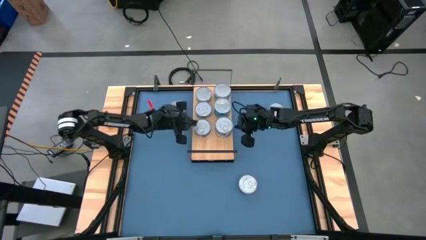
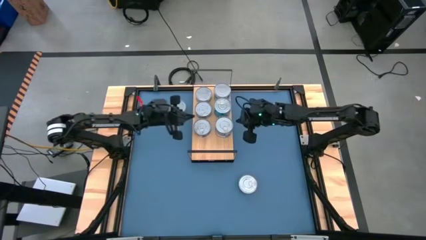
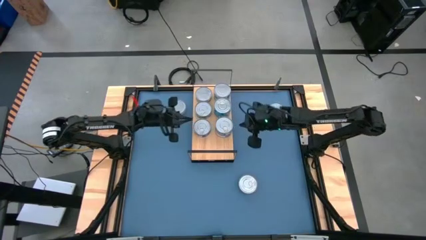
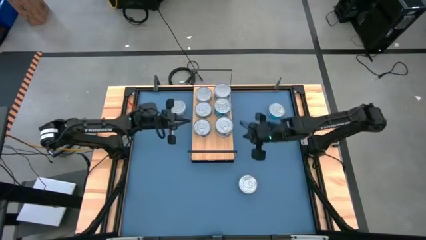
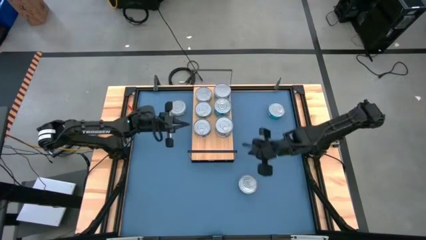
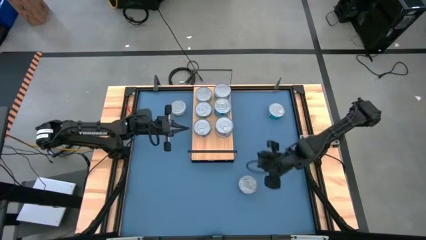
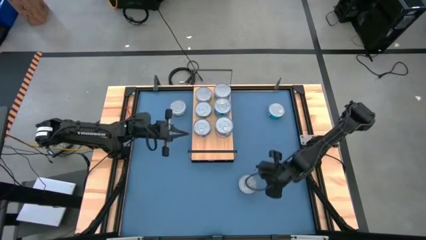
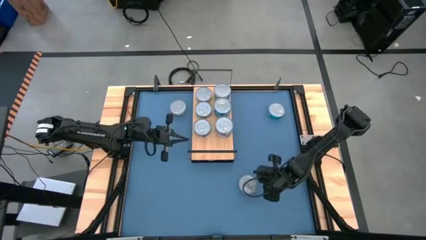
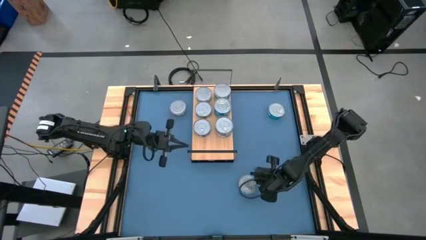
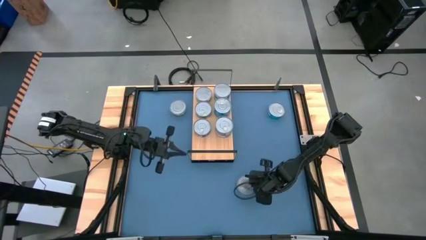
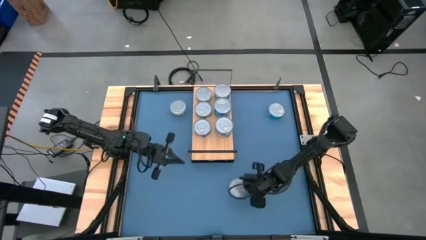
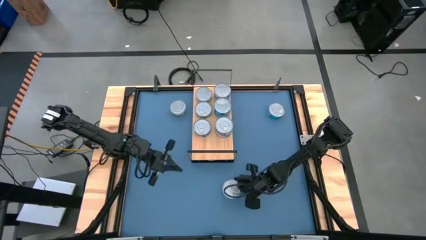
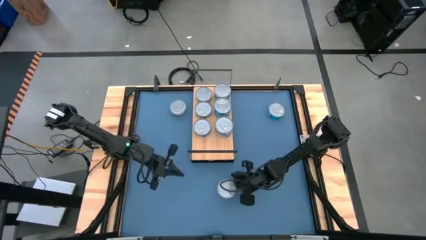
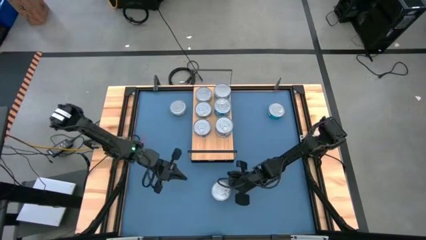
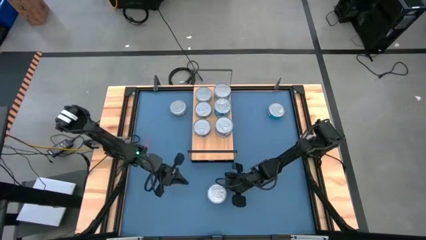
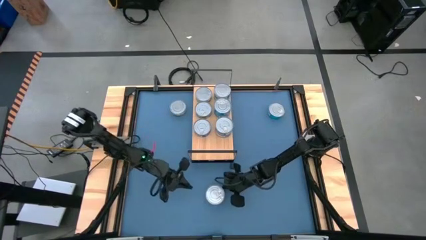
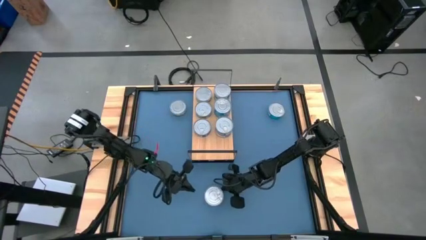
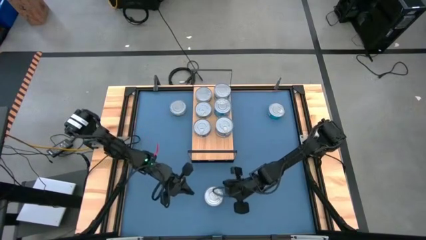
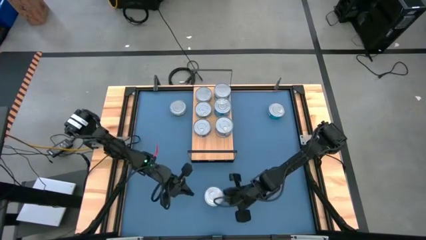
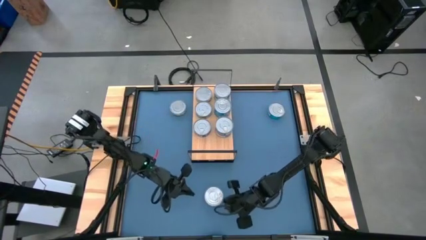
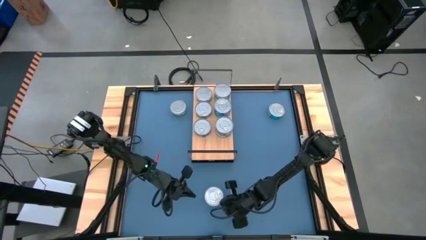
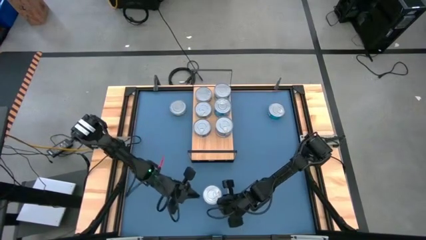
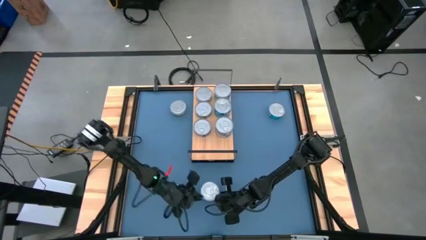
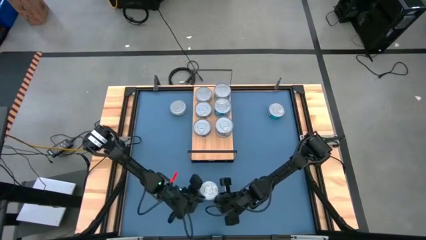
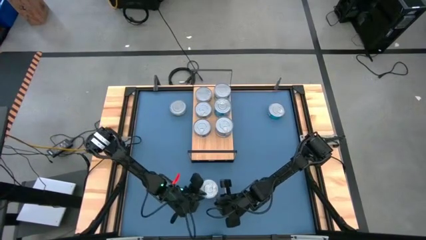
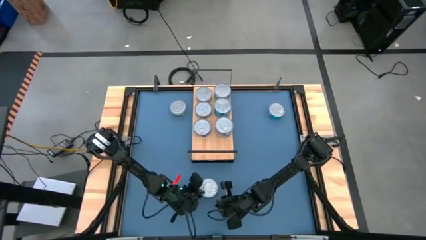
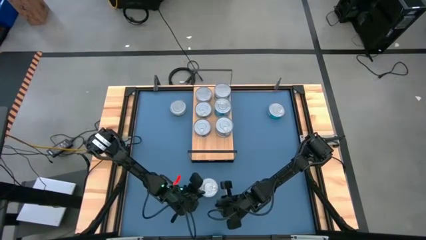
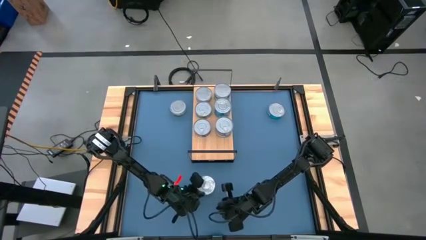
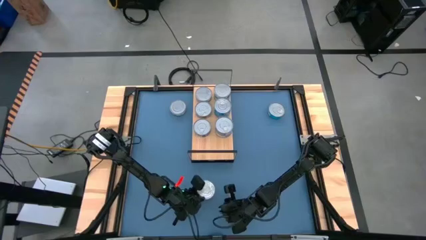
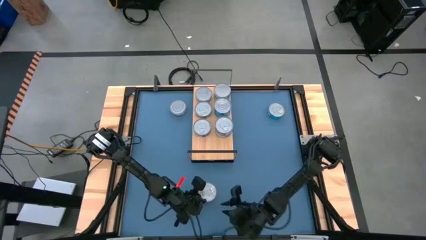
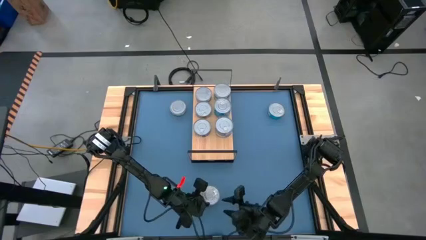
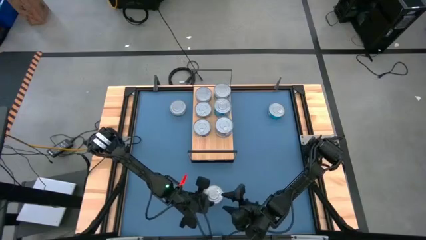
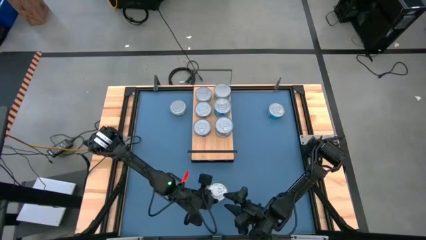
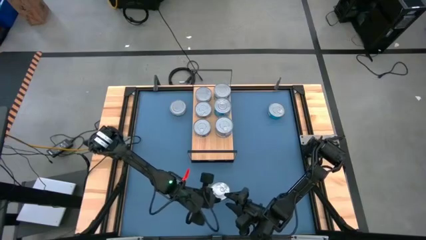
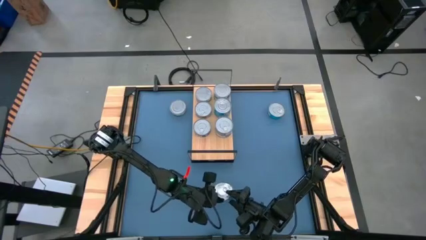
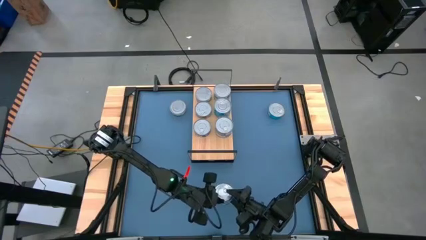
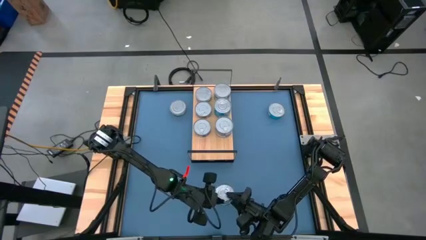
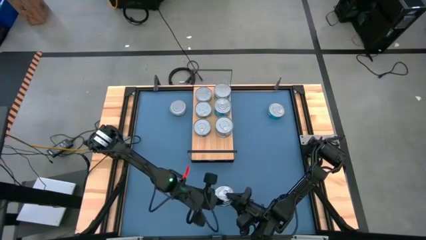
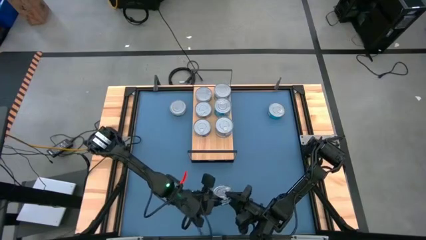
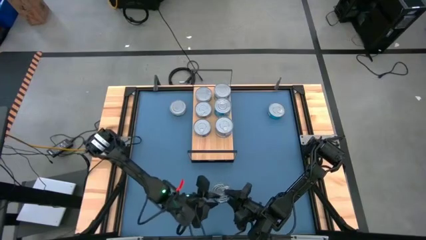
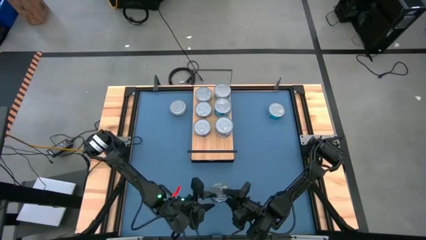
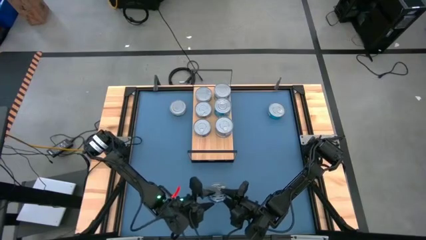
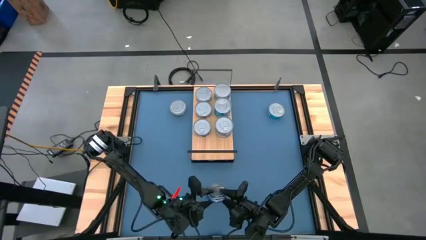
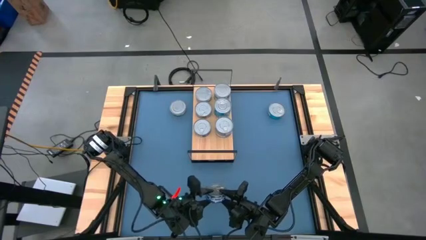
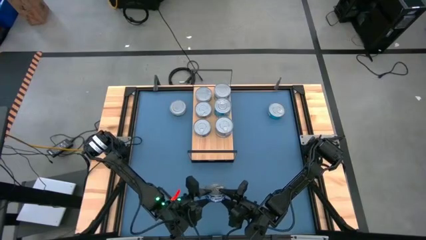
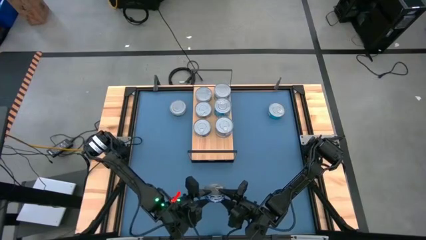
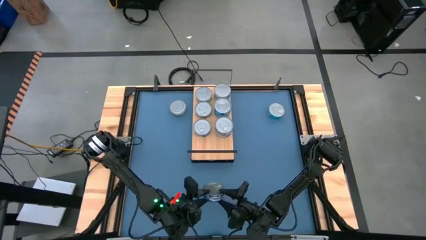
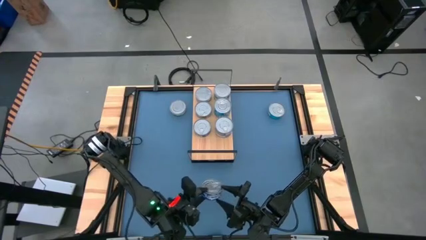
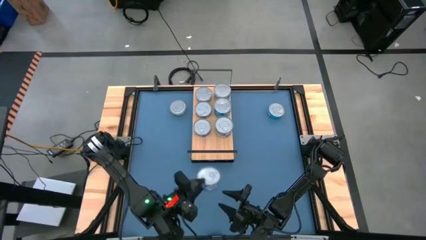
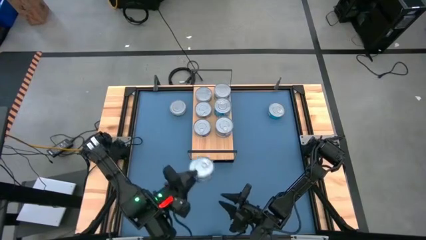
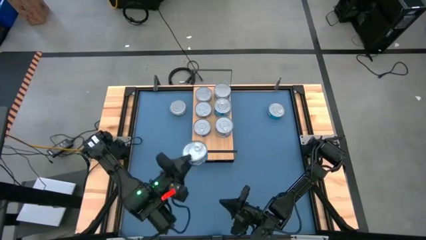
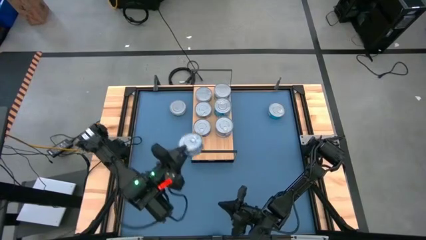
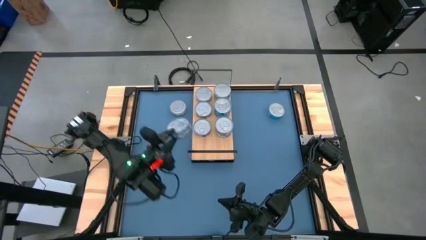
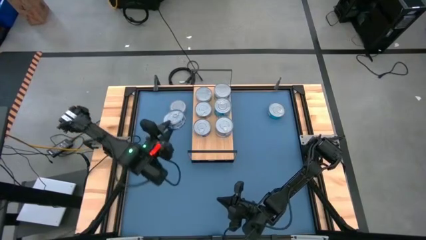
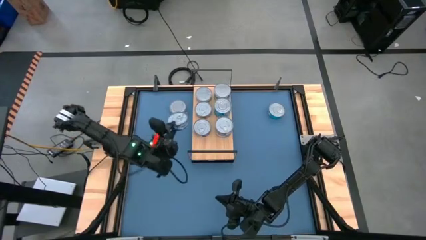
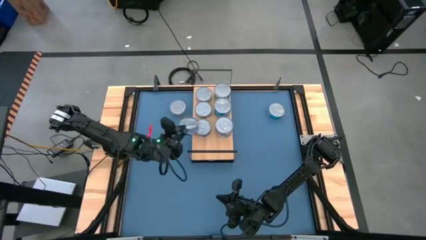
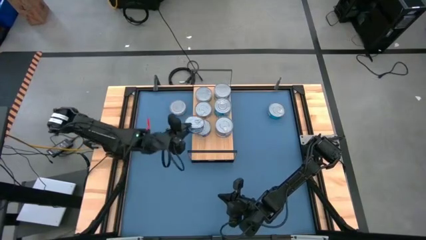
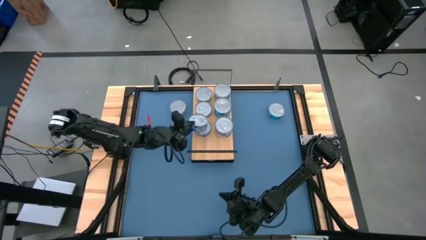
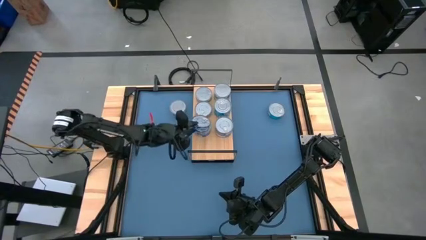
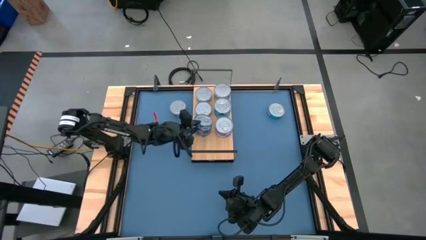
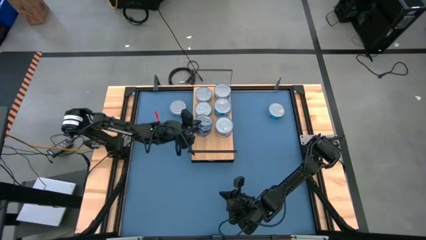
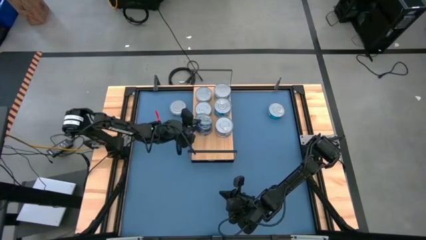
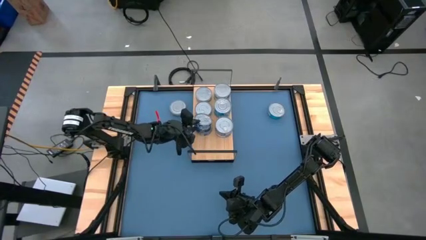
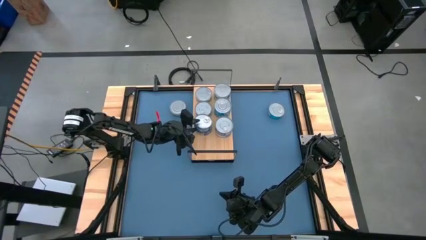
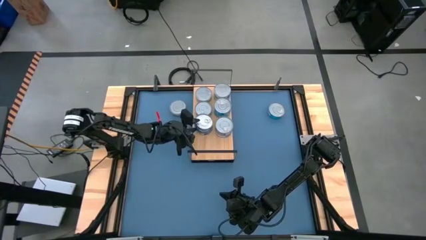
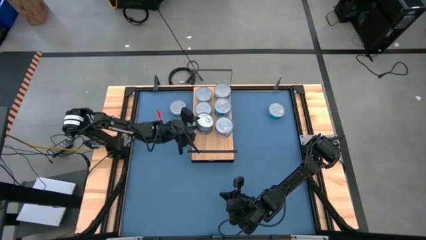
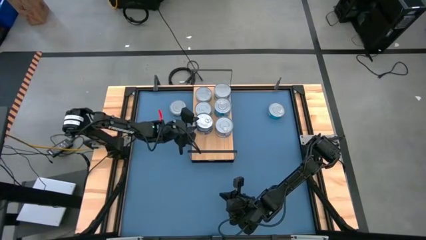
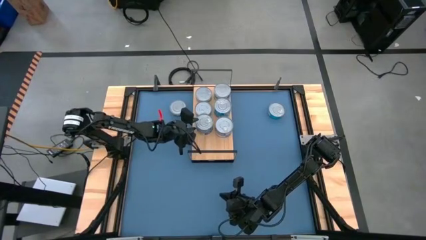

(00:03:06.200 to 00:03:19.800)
Task: Stack canned seafood by type on shelf
Stack the blue tuna can on top of the other blue tuna can on the shelf

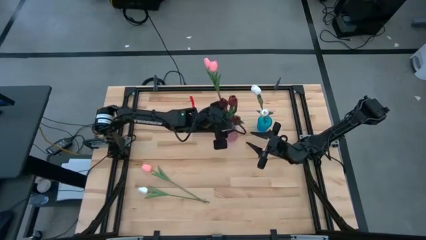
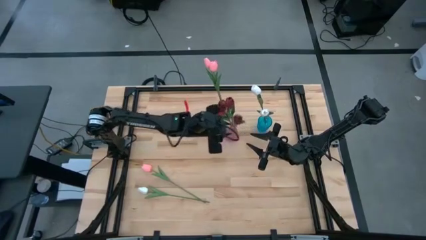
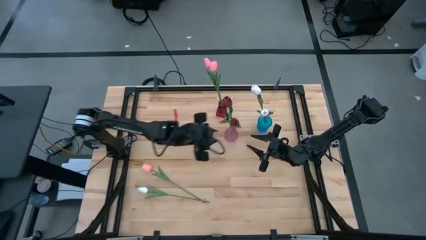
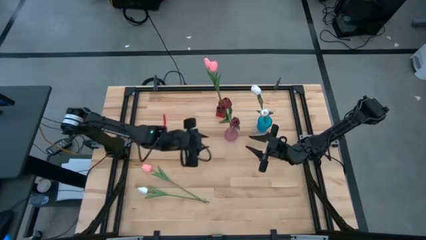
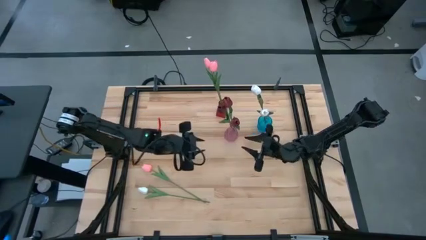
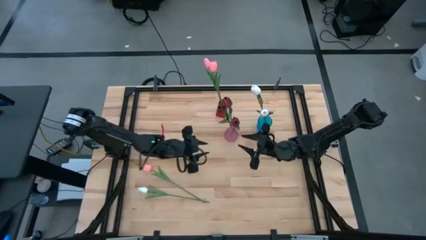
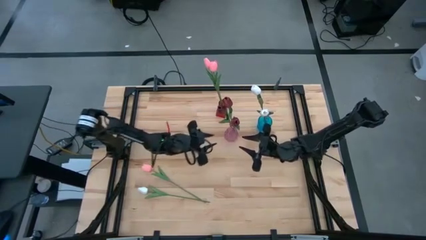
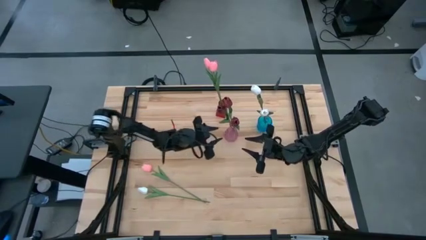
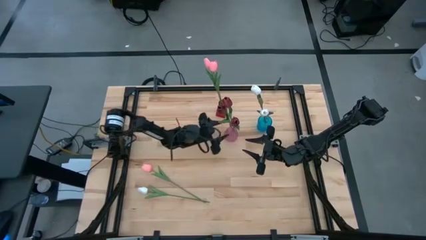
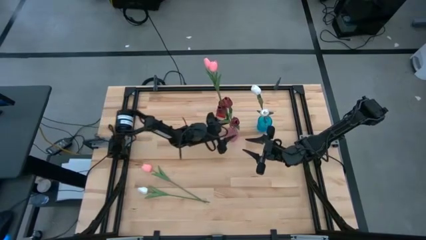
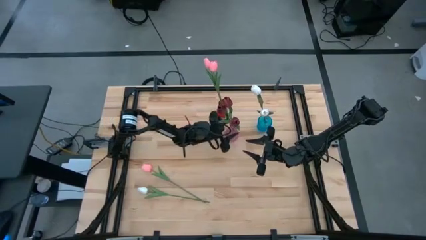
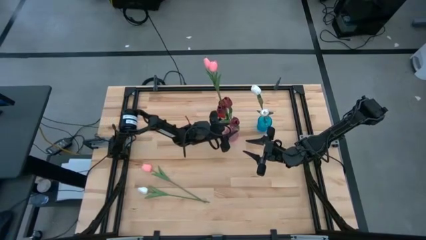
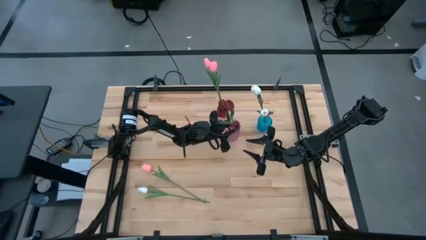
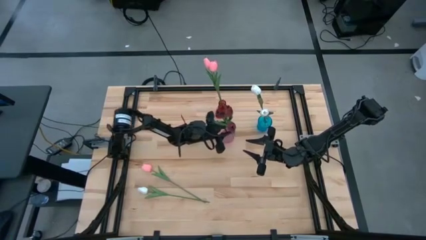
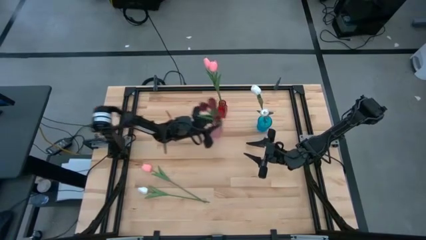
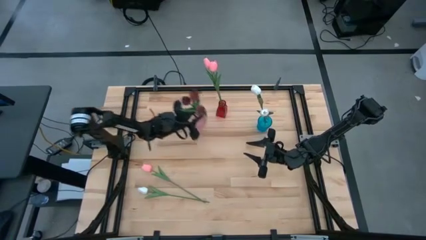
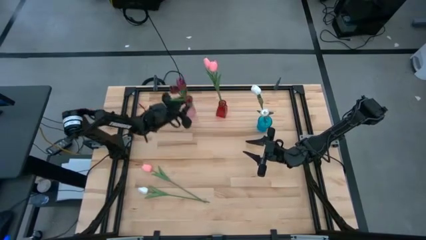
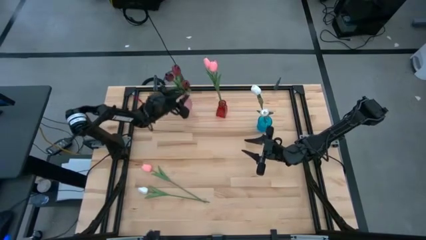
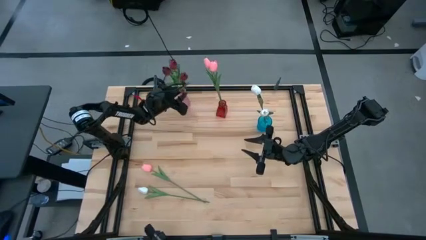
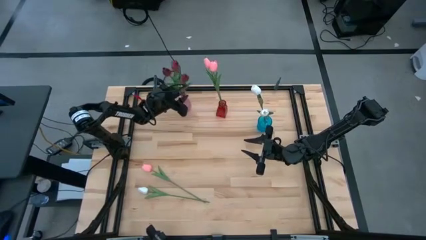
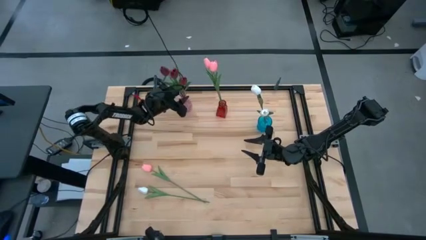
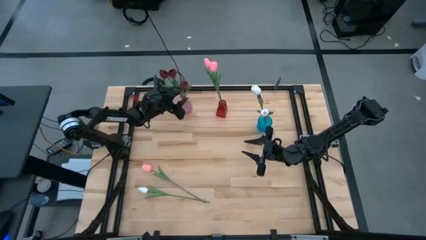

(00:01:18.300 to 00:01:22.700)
Task: Sort flowers into vase by color
Move the pink vase to the top left of the table
